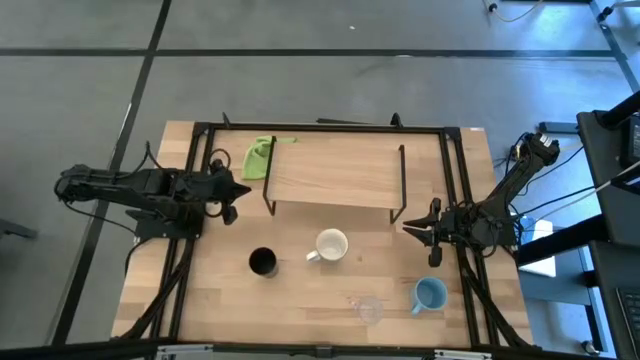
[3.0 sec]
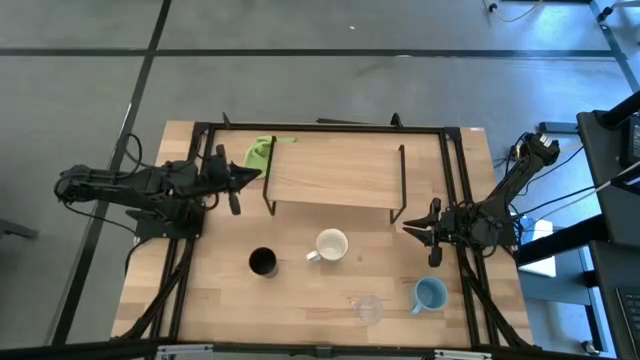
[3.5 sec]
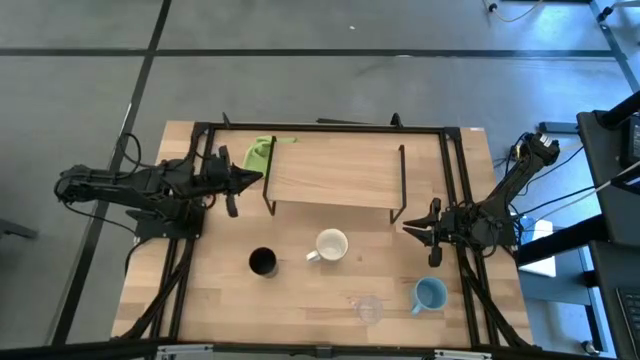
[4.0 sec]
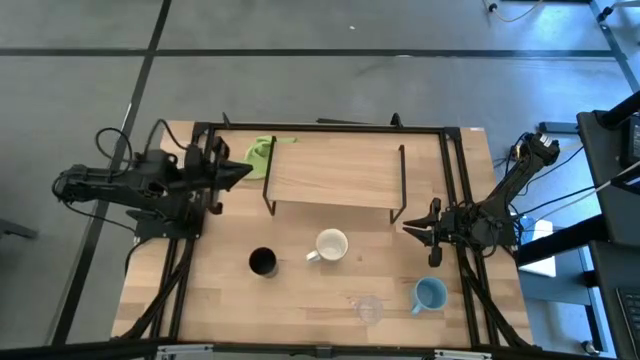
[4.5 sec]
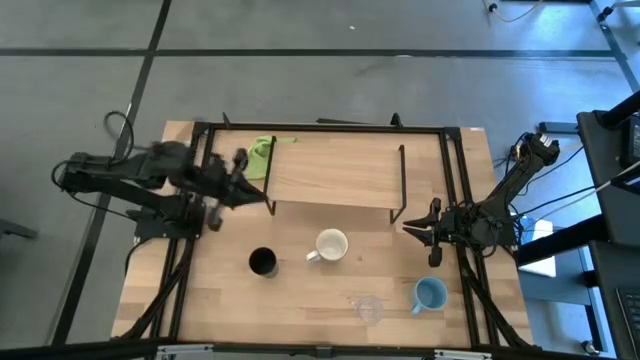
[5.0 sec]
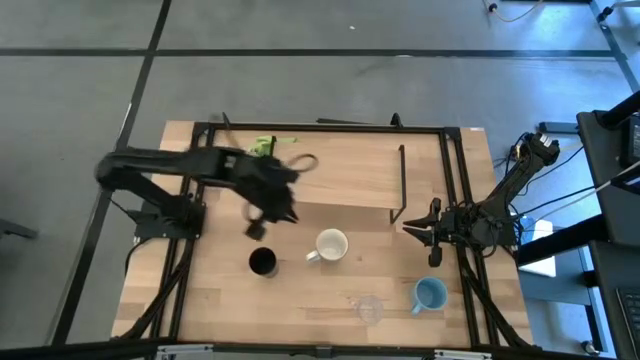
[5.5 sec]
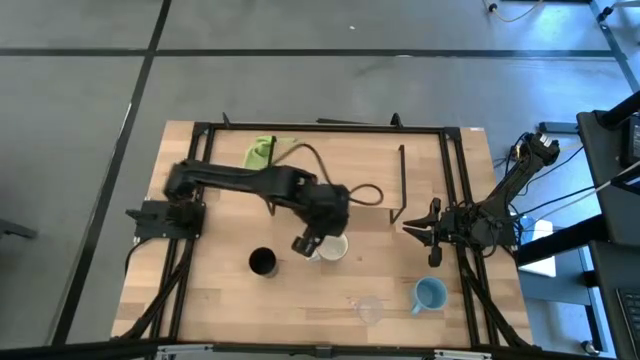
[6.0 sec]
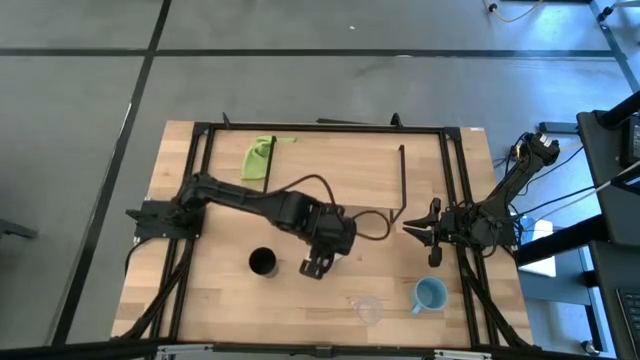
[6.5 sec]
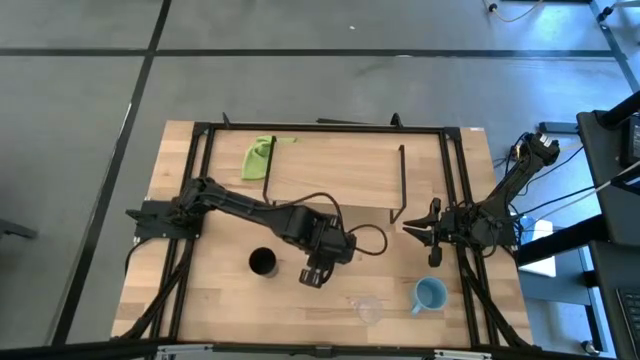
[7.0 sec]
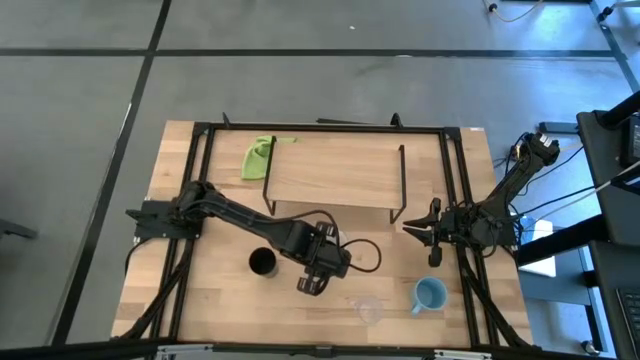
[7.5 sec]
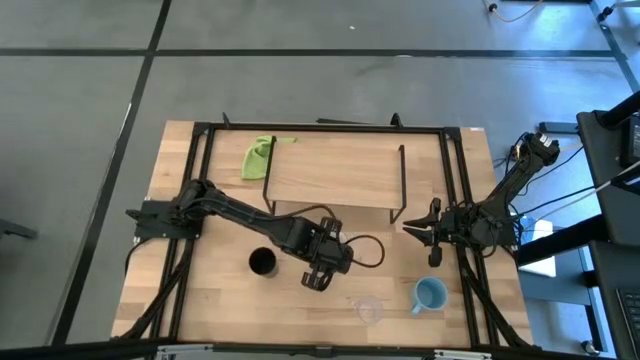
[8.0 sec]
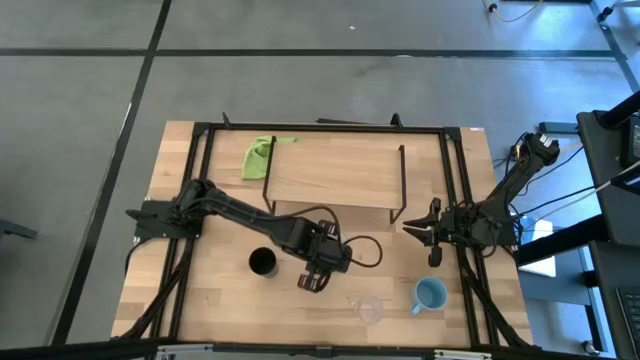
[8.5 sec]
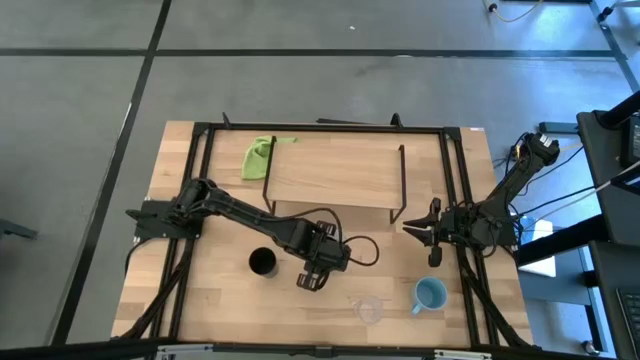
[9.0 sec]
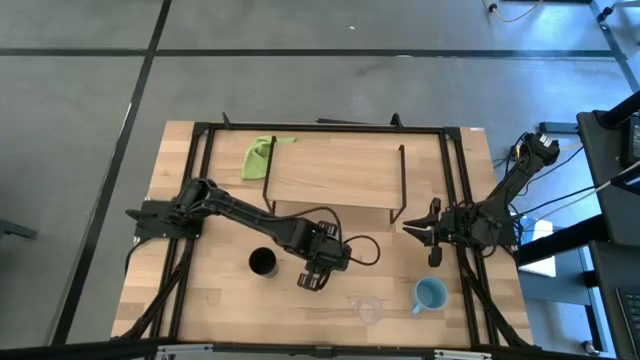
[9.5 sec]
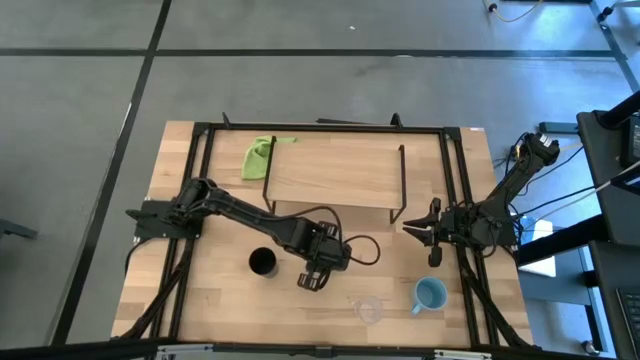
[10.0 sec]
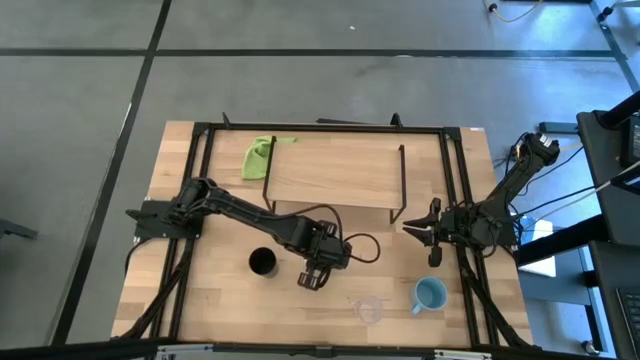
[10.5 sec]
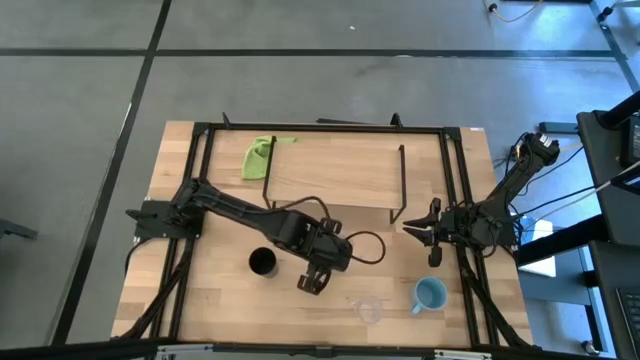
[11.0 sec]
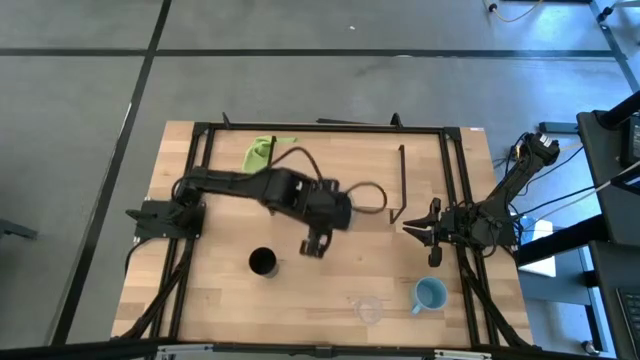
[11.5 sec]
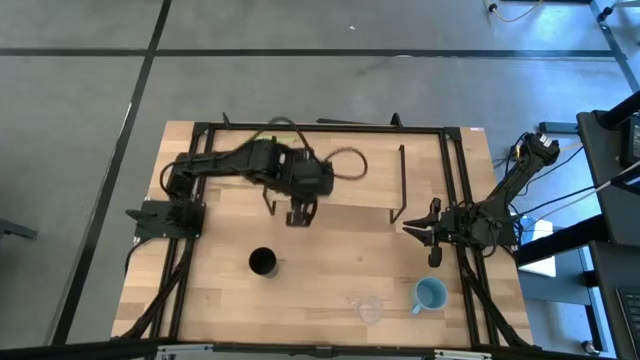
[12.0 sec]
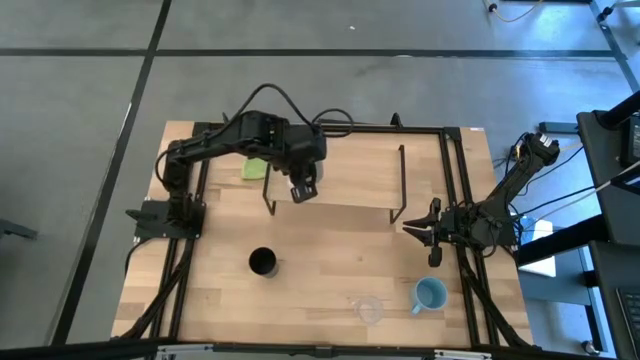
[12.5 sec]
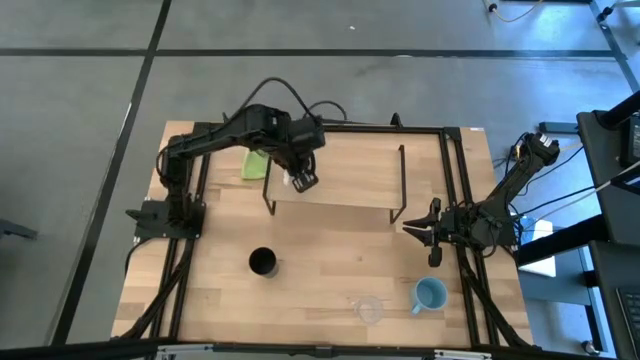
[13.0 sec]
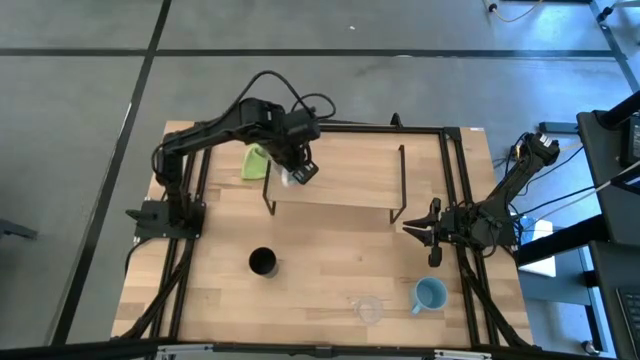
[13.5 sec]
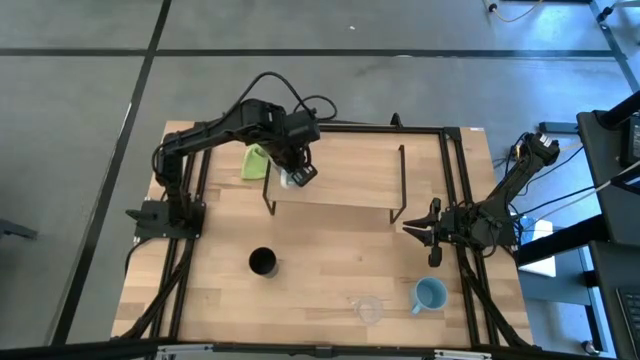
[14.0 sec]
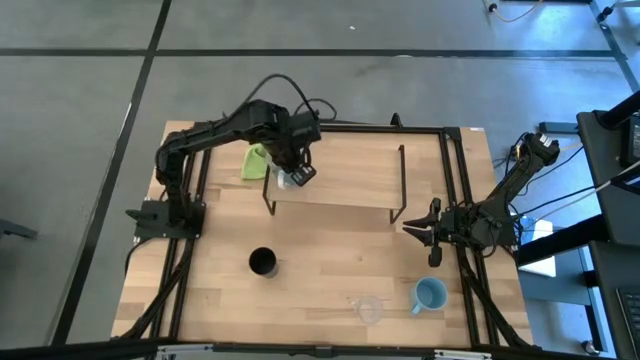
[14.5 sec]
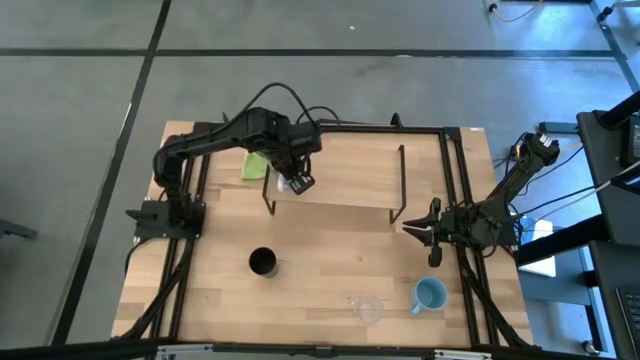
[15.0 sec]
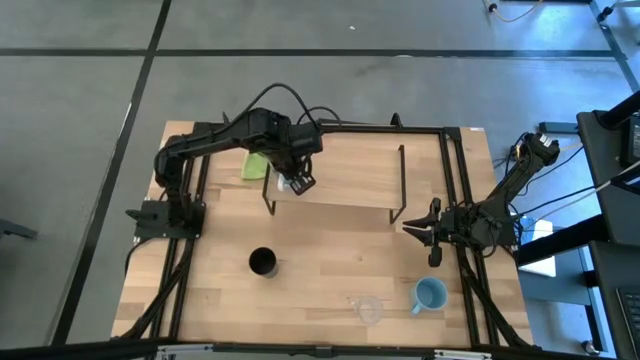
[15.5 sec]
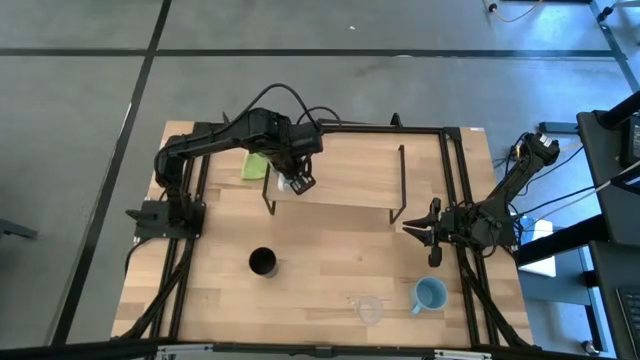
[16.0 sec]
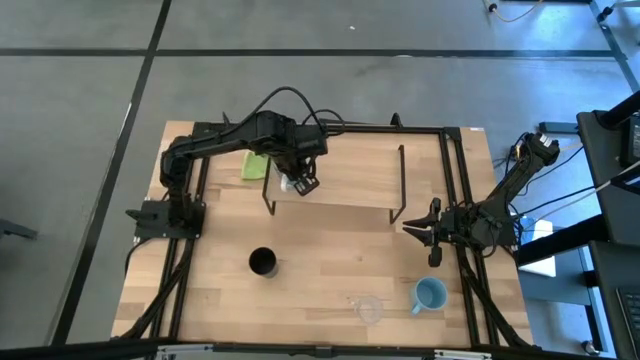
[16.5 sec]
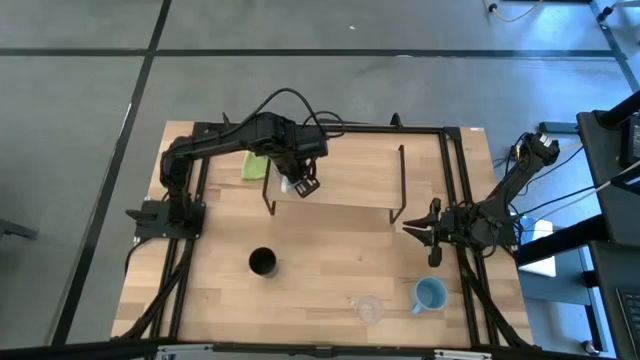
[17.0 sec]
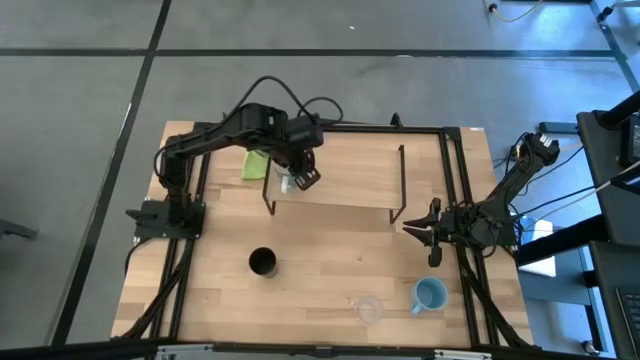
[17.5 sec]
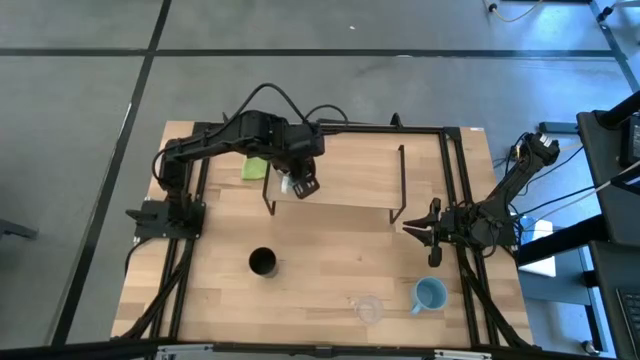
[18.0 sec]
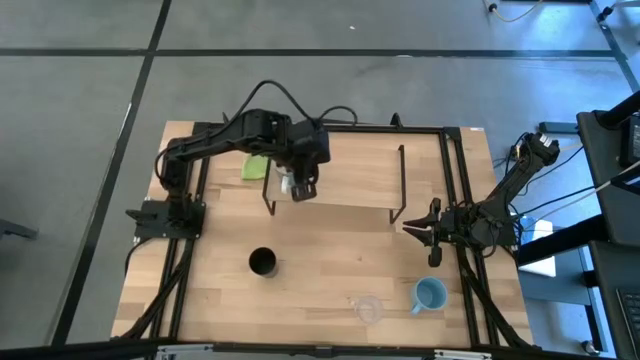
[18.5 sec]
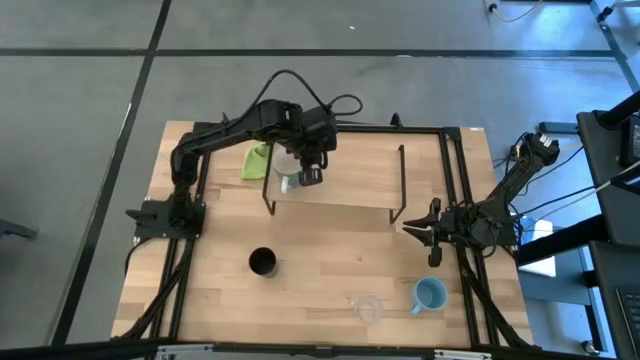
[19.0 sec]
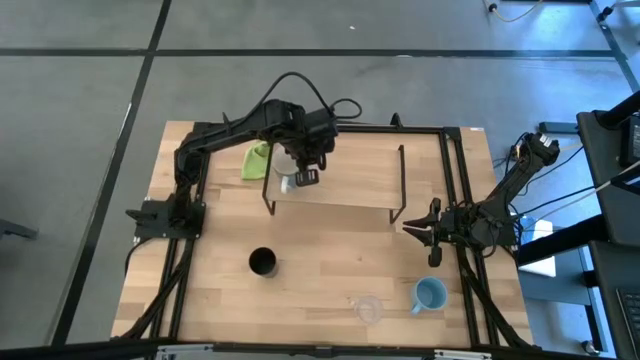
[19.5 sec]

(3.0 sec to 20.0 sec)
Task: Stack small to large cups/mugs on shelf
Put the blue mug on the shelf
